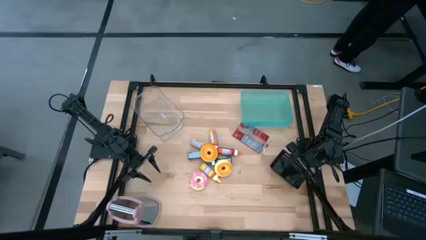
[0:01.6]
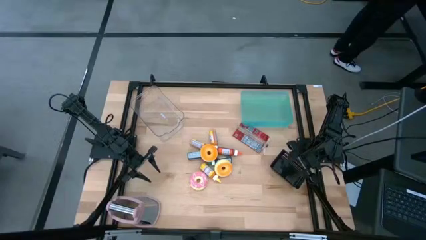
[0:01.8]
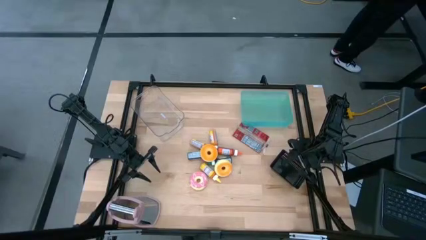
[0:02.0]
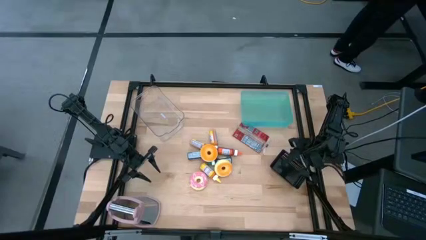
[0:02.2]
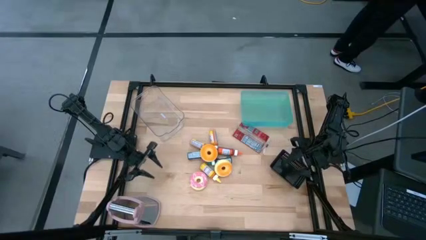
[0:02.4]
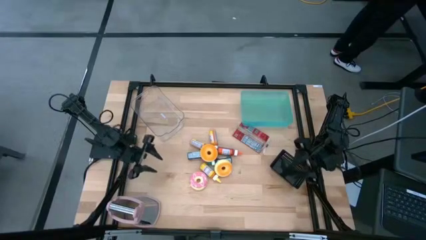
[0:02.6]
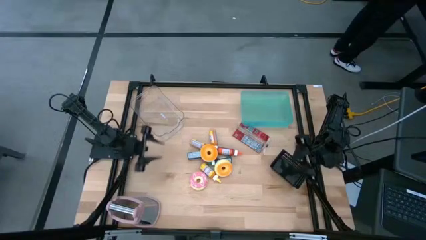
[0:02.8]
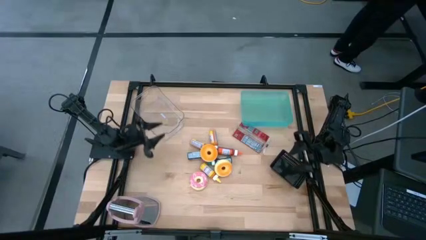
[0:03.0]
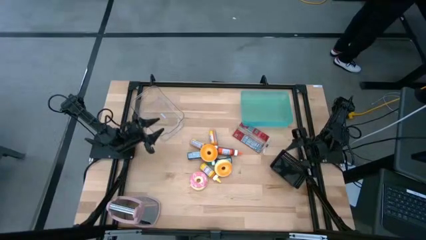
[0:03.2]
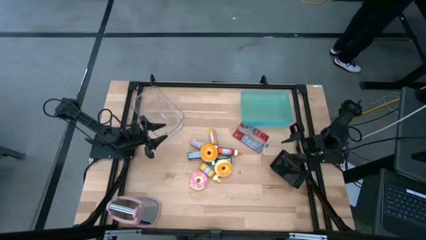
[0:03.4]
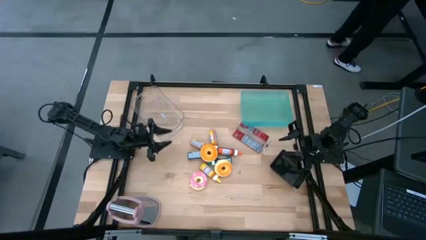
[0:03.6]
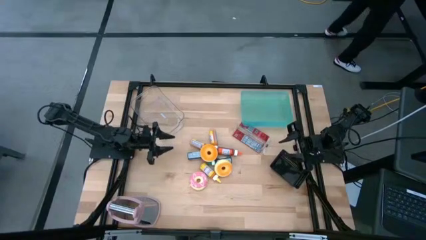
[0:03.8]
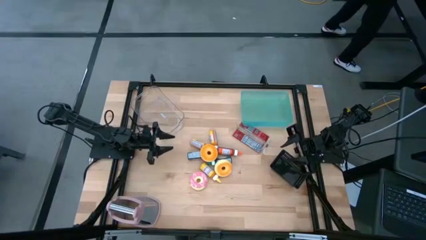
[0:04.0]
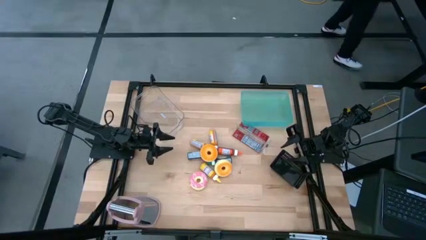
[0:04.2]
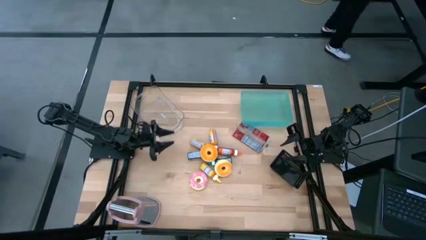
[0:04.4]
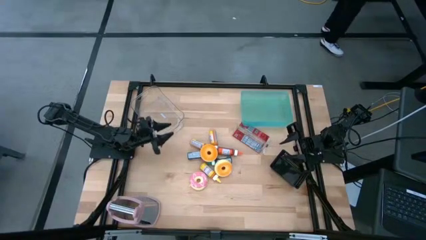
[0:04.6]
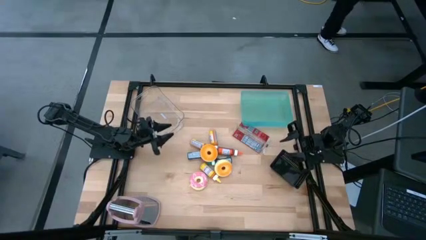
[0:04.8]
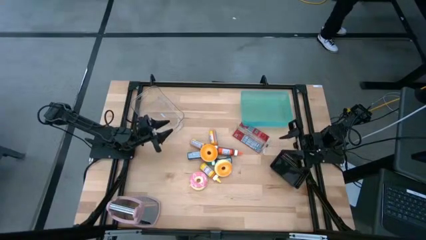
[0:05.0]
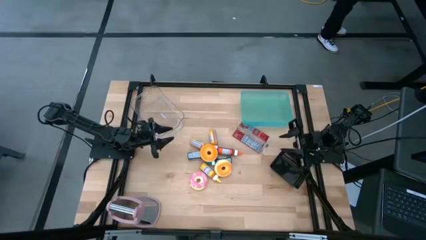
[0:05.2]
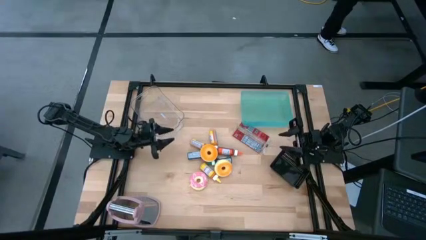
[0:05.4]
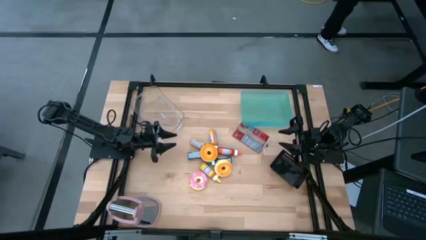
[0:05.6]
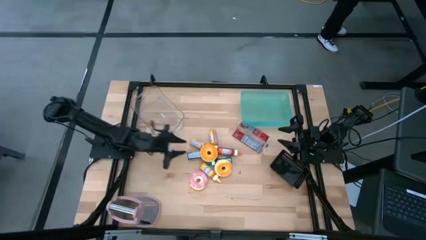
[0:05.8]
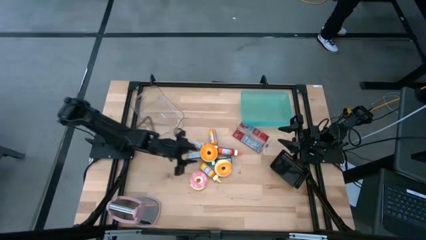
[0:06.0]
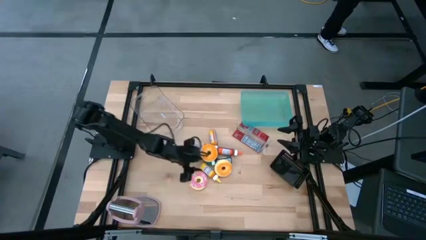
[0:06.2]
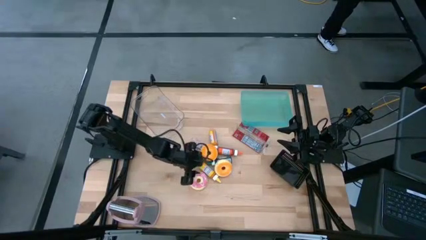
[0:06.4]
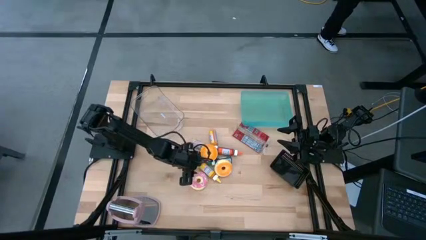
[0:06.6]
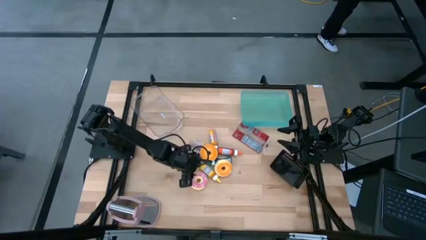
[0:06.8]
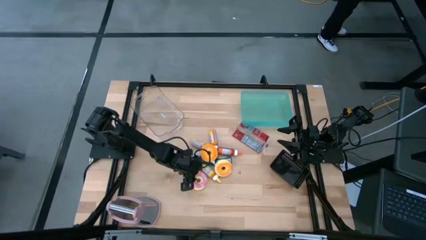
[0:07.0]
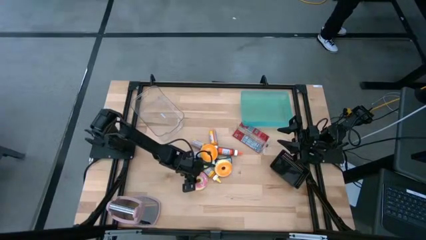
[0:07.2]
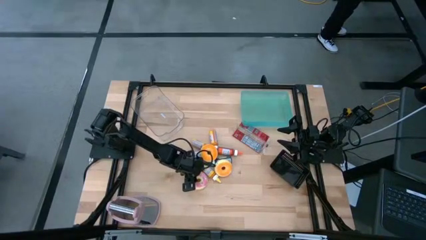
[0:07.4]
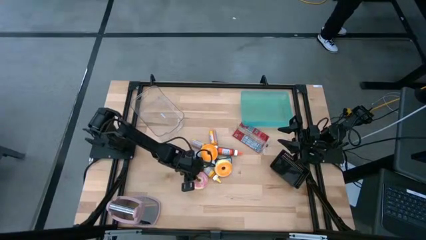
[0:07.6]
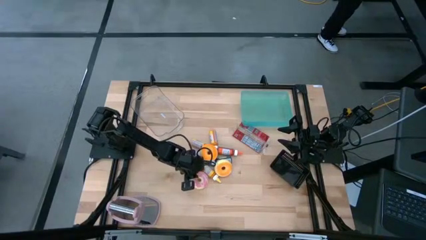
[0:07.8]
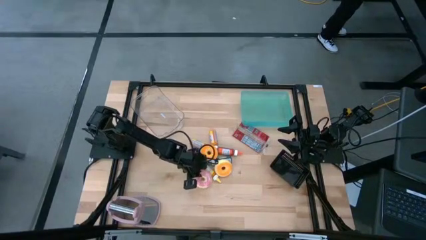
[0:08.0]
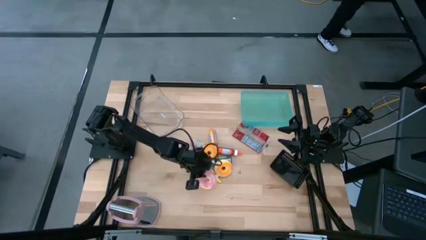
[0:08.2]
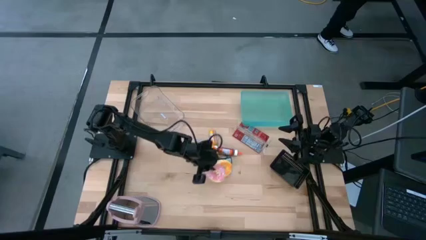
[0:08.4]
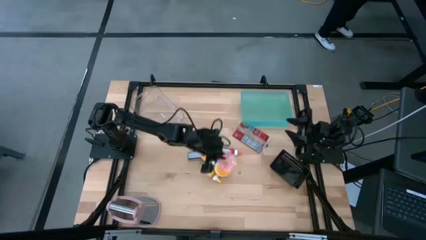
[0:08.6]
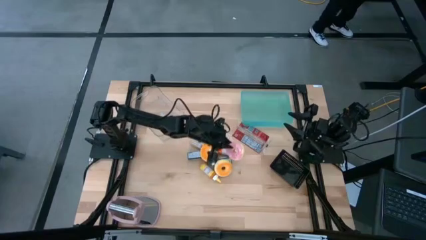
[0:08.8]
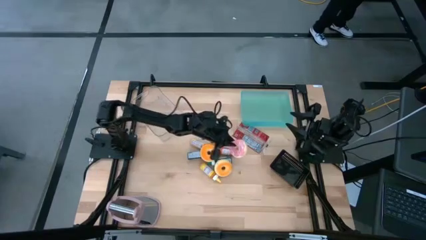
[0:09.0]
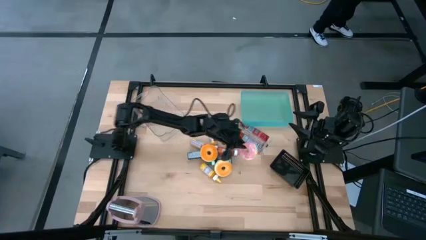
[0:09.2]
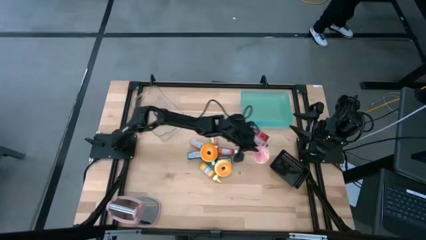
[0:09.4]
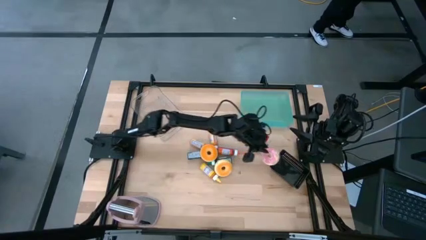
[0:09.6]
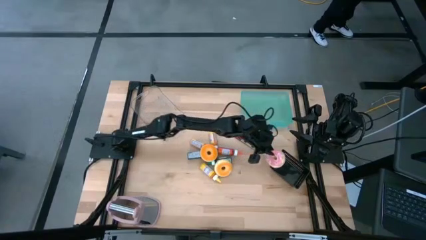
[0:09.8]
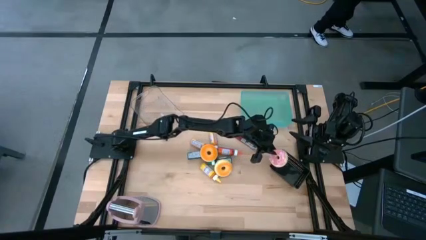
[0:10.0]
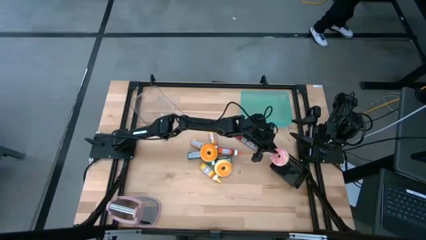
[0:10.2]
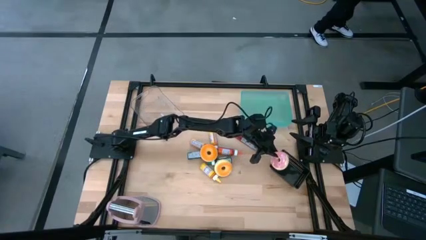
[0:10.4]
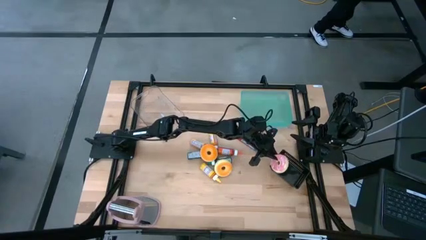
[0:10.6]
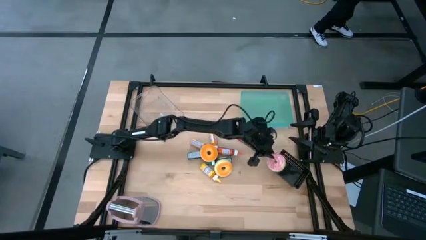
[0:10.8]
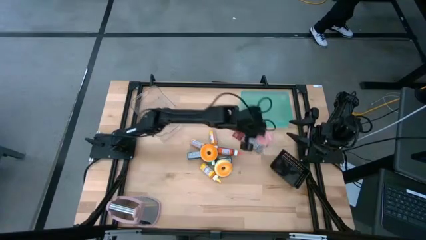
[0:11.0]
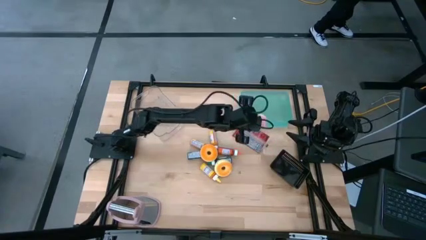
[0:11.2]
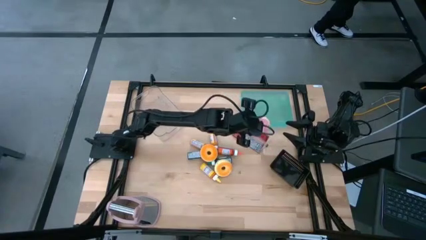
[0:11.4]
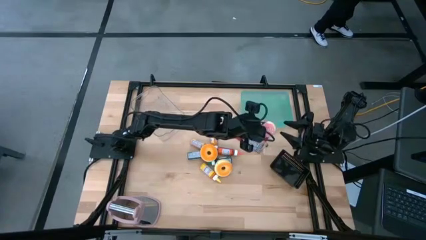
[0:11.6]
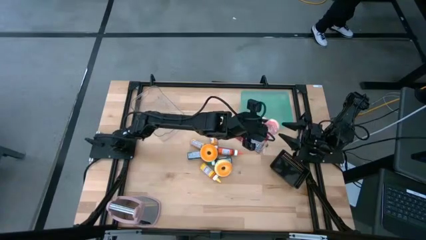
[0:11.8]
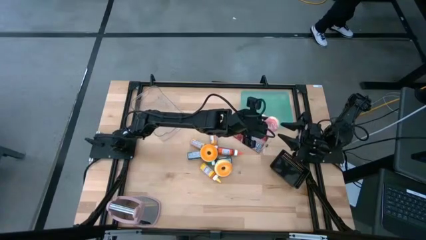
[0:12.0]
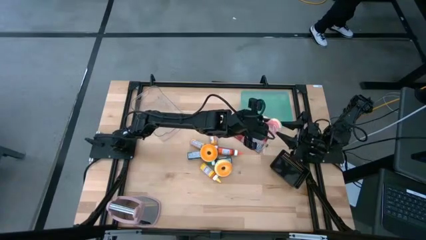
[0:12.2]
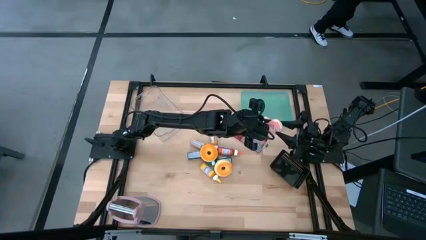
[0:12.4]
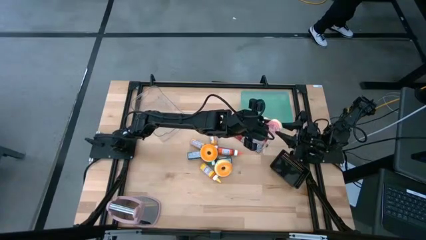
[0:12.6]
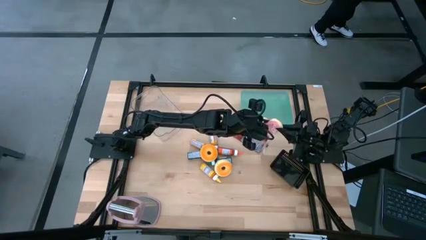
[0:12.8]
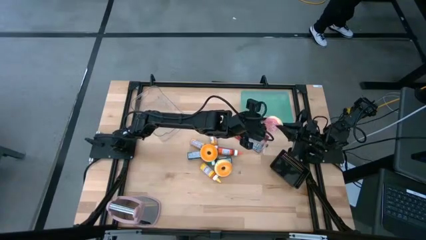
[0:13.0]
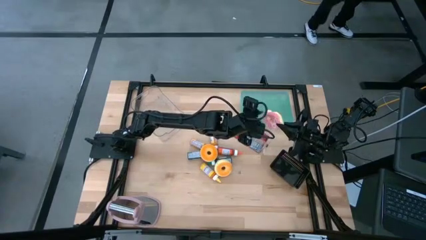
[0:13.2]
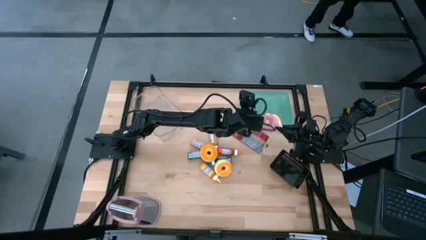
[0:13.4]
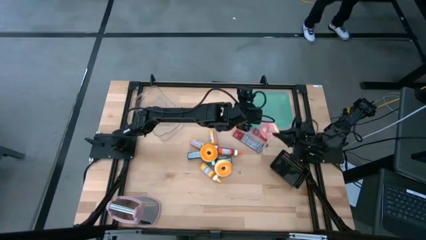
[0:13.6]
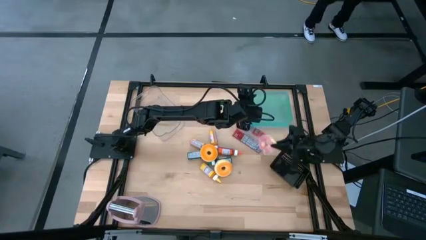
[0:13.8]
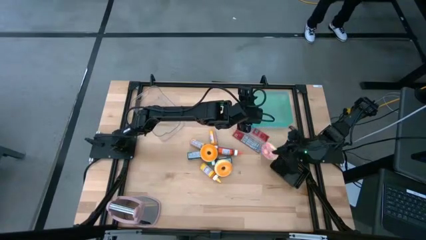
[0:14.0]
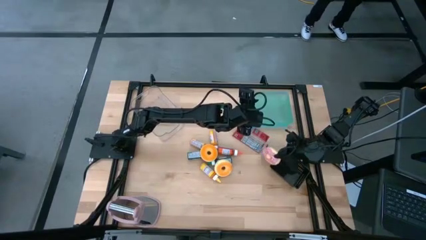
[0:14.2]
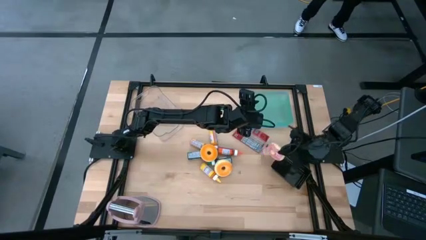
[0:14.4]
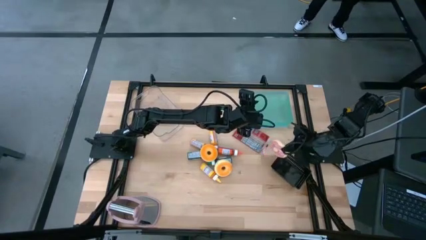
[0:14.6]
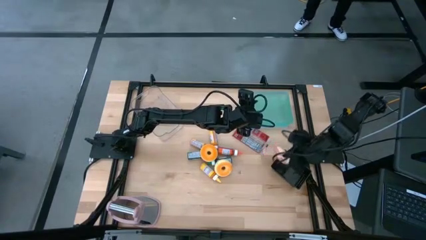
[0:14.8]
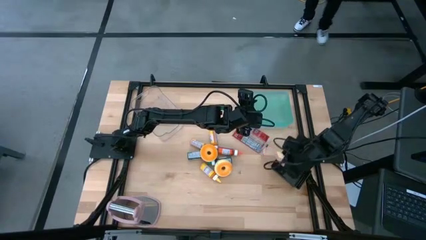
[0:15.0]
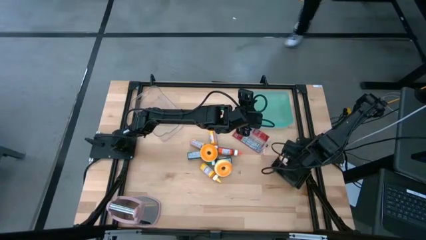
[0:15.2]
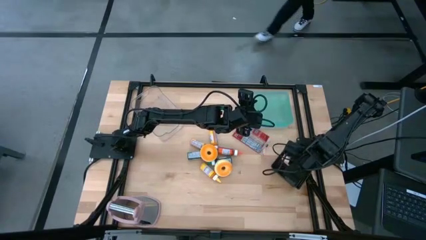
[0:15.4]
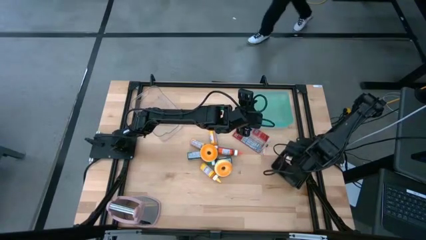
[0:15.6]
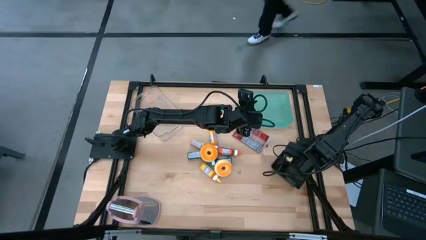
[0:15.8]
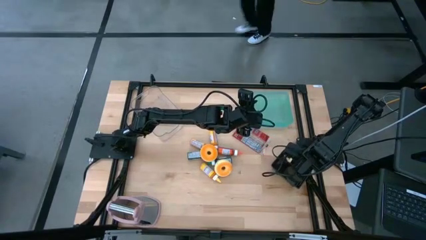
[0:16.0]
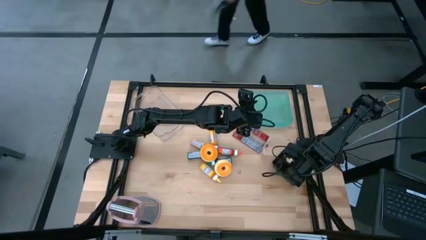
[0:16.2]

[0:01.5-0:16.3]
Put the pink donut into the black bin
